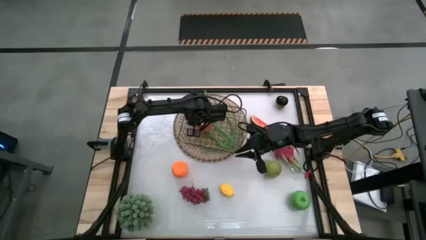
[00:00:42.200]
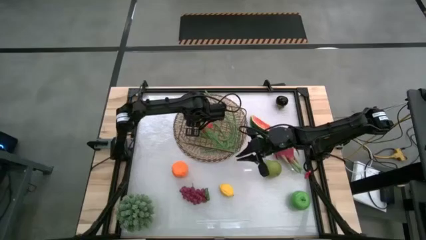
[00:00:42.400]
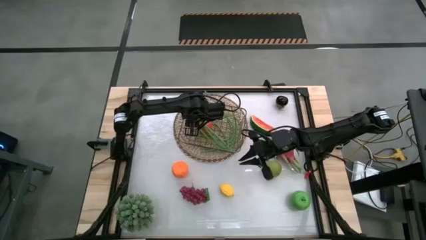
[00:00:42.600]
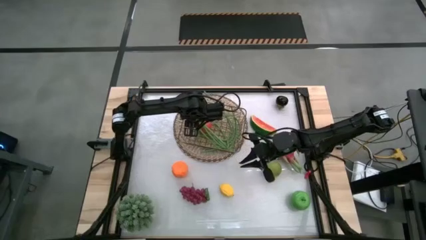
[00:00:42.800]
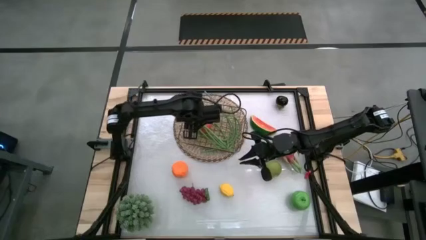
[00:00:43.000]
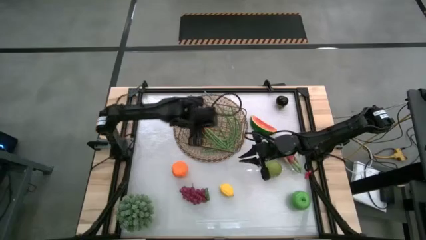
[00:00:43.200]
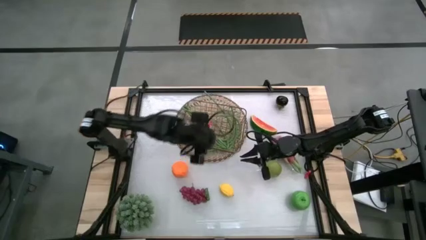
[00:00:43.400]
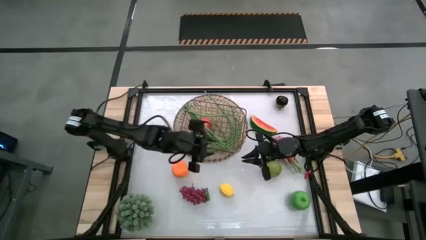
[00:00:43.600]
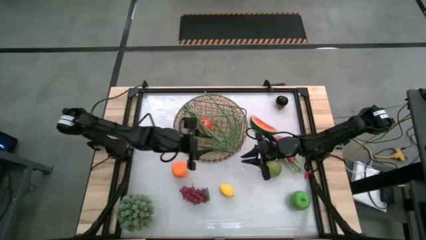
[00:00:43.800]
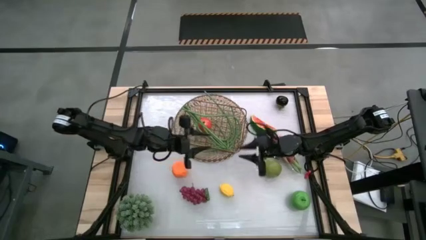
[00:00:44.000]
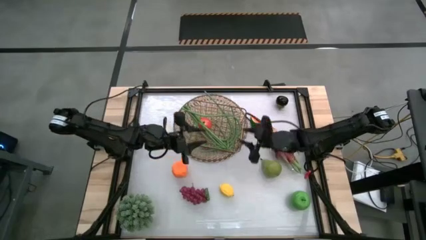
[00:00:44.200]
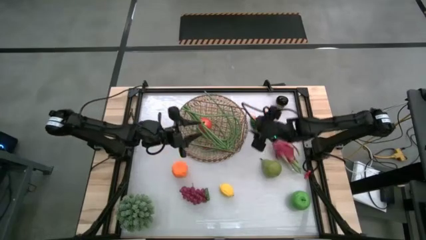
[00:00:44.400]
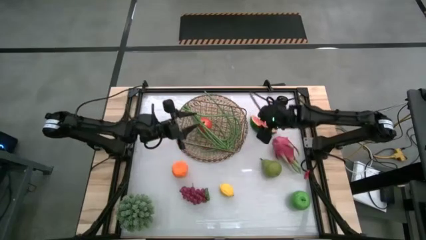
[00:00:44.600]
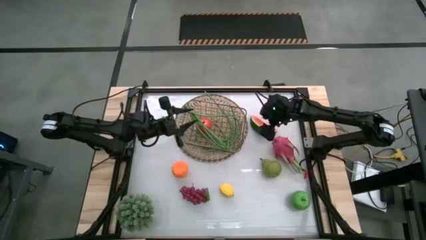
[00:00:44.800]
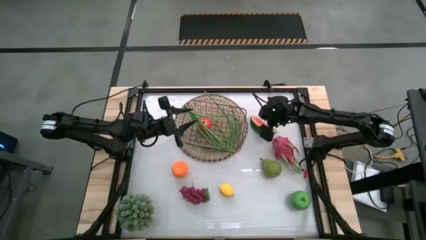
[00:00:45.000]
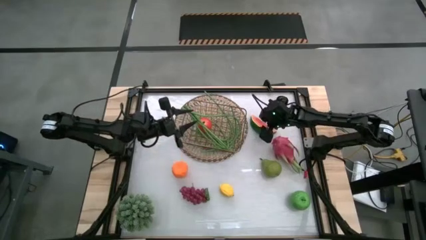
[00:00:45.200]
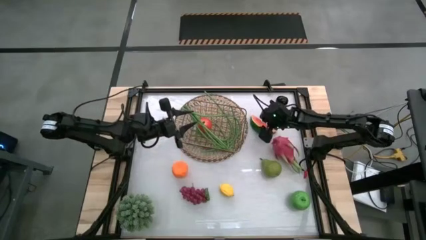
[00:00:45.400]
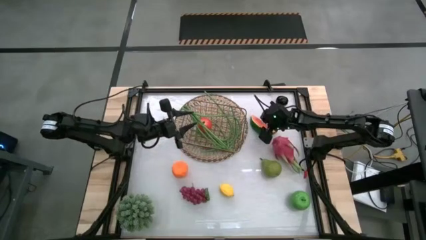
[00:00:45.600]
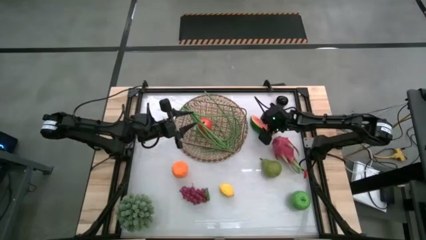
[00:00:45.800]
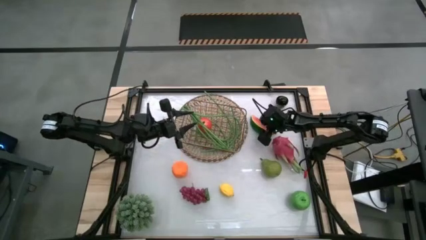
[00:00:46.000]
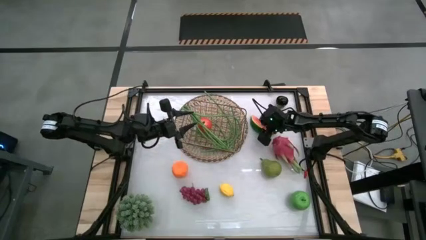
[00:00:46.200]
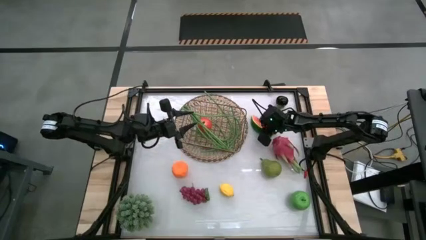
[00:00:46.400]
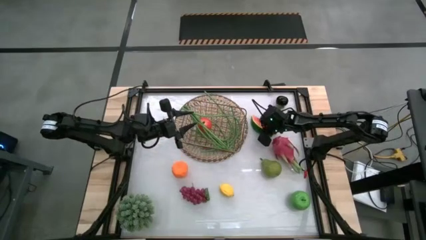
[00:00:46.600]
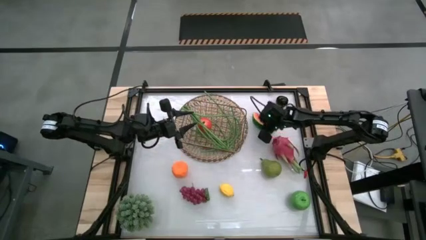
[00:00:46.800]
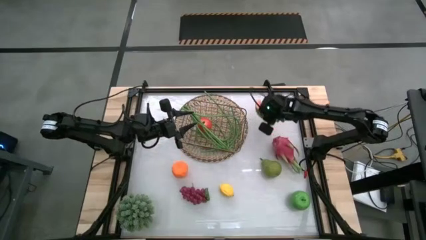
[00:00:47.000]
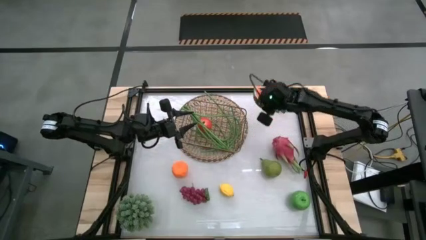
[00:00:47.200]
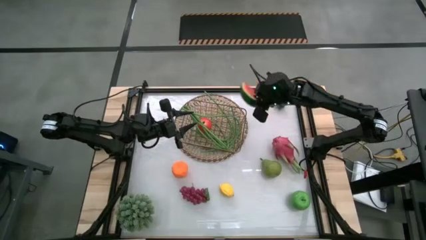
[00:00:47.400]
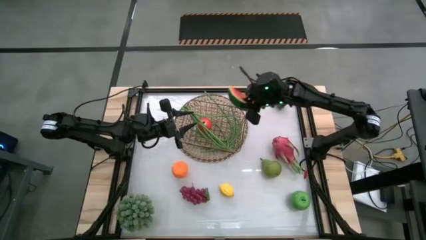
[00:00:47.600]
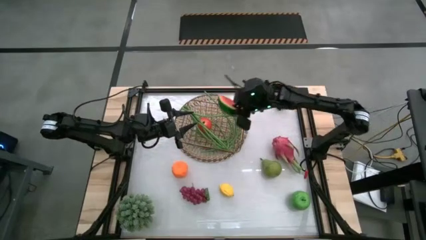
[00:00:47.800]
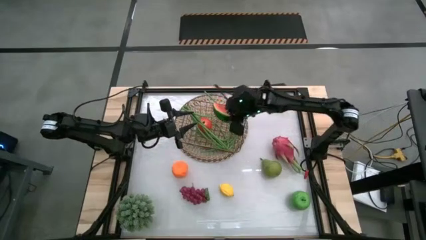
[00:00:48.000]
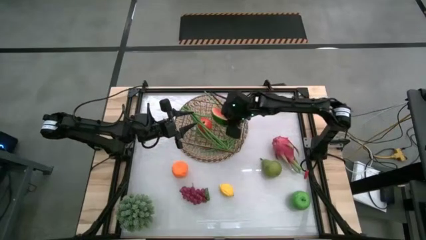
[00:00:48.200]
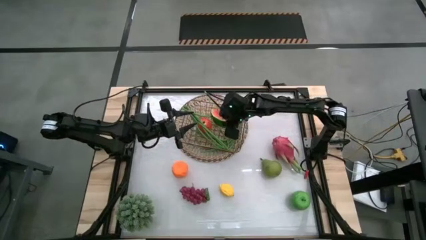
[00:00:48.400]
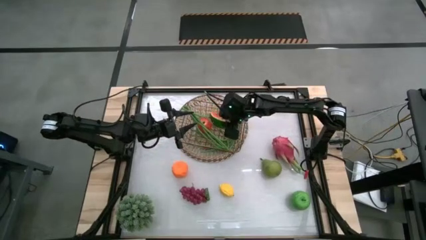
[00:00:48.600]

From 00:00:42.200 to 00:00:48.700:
Task: Build produce basket
Put the watermelon into the wire basket

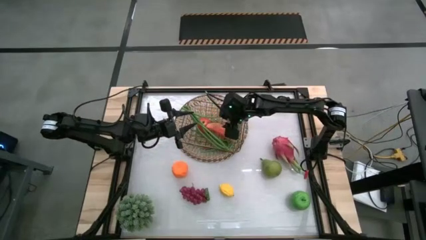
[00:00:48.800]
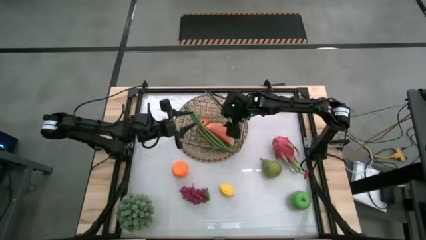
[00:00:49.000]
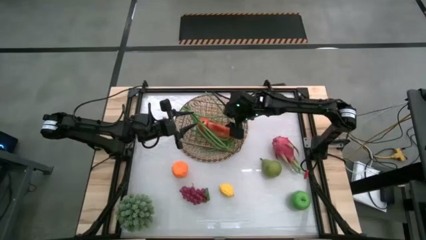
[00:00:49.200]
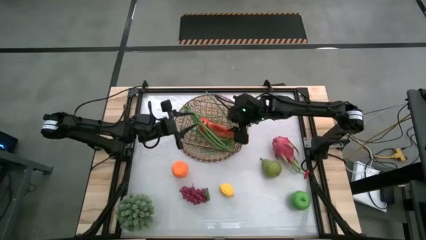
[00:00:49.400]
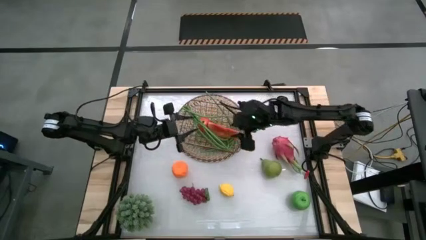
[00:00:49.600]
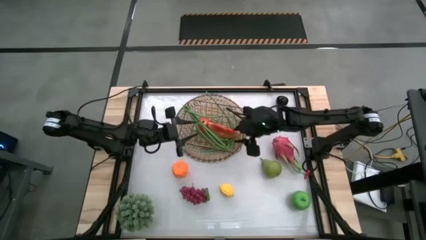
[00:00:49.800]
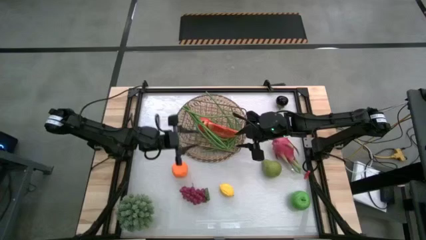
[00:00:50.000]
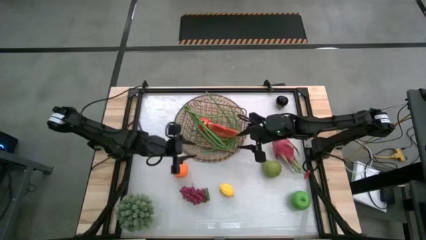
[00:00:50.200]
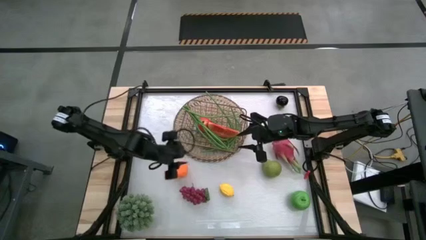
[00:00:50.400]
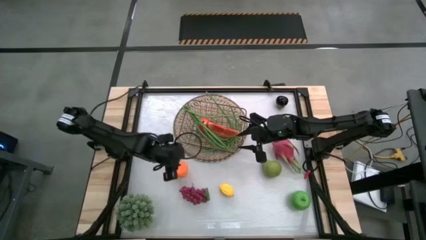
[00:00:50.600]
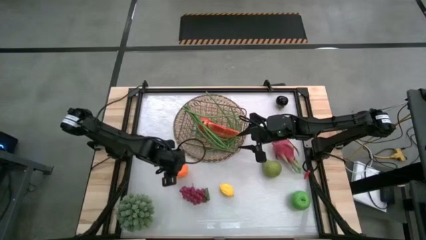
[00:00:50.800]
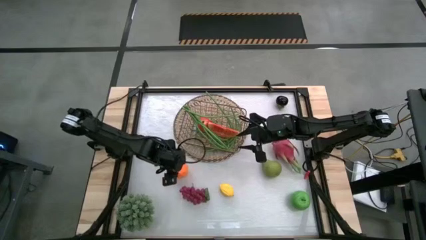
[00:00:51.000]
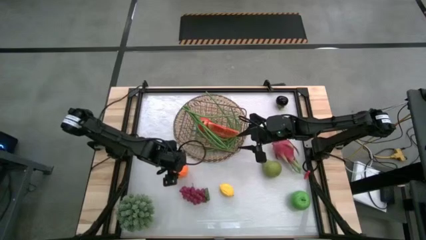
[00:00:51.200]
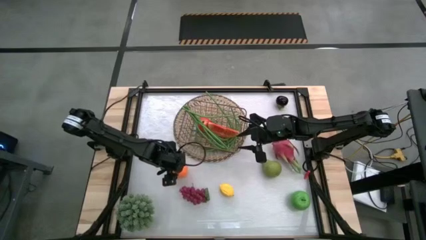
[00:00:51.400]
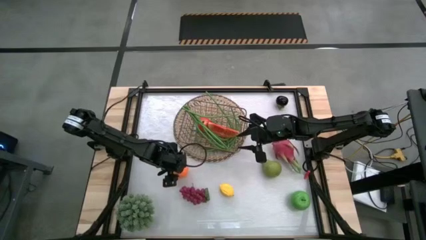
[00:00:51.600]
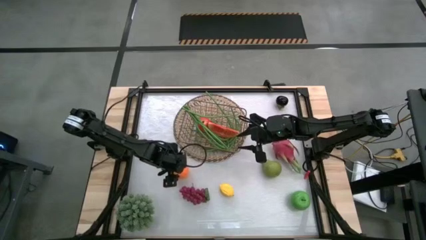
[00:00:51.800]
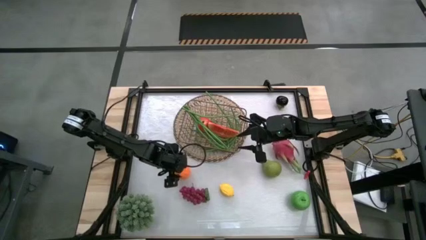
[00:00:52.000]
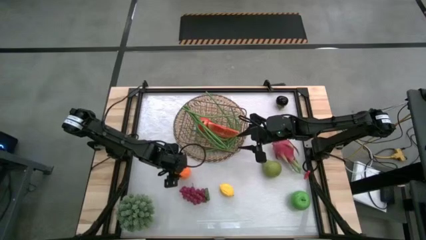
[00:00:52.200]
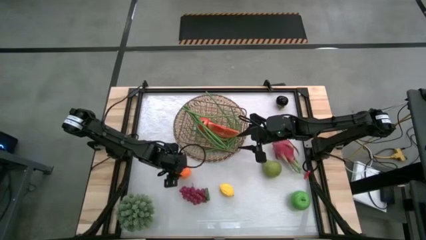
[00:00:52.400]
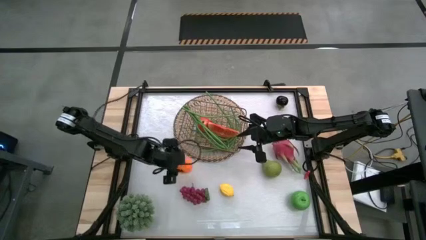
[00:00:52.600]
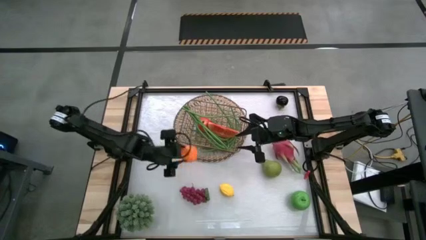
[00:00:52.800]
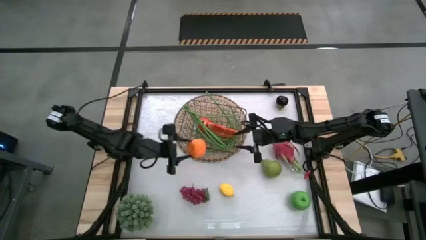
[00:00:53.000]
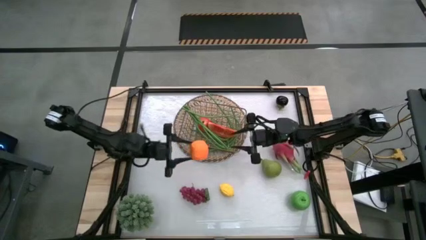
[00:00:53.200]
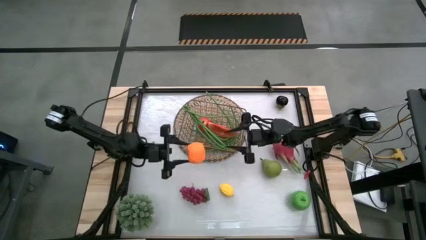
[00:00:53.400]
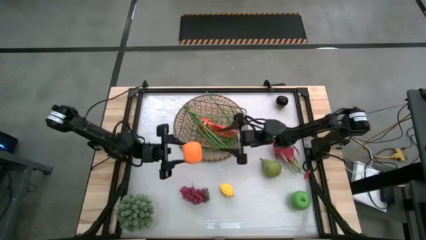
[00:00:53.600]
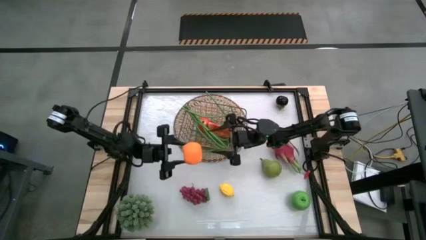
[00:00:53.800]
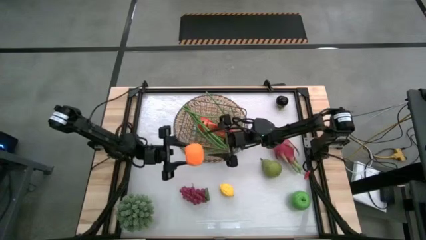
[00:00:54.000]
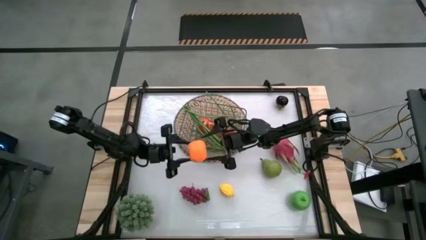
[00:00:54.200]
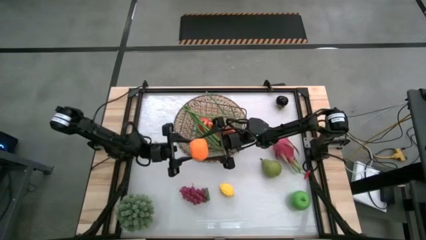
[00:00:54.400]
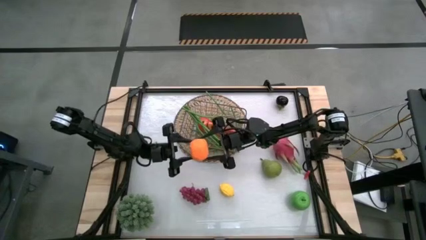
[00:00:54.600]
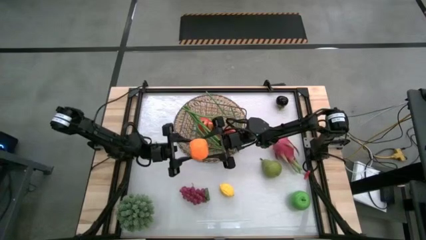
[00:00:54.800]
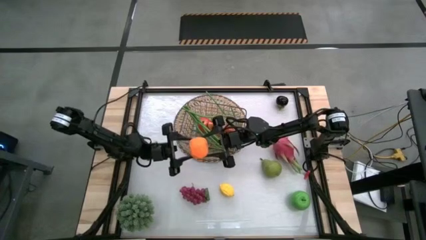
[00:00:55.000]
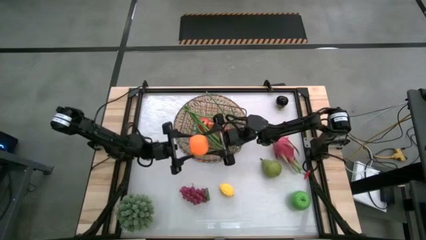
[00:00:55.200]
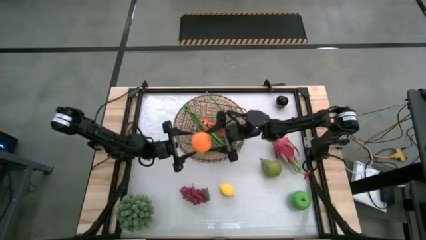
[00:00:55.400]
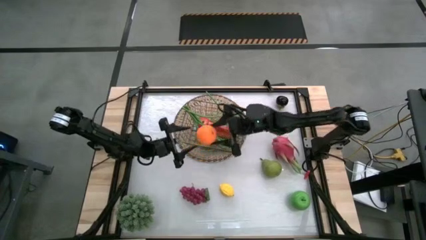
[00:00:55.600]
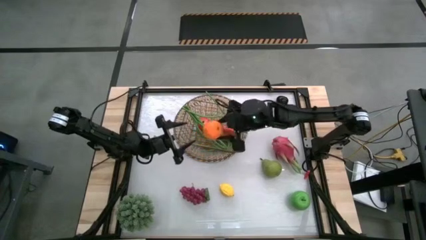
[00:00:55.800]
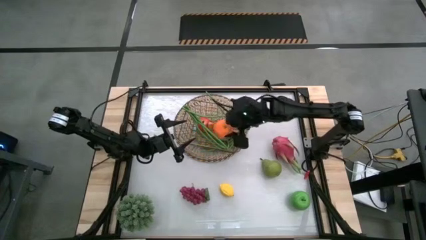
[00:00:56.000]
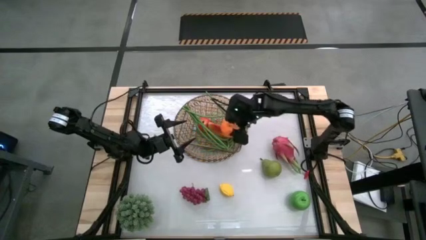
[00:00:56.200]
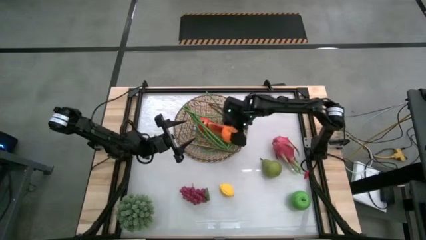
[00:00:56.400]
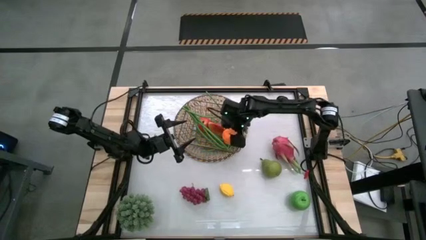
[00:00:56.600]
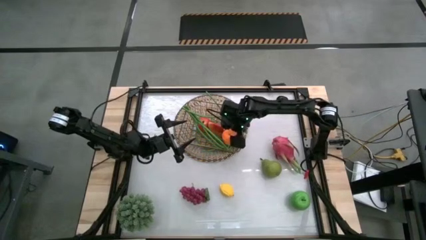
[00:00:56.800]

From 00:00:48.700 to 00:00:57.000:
Put the orange into the wire basket
